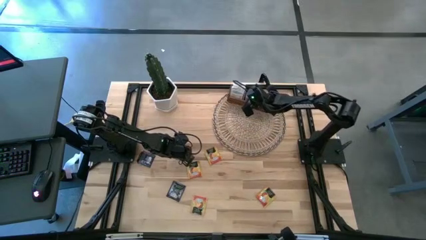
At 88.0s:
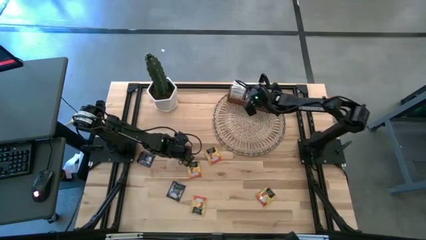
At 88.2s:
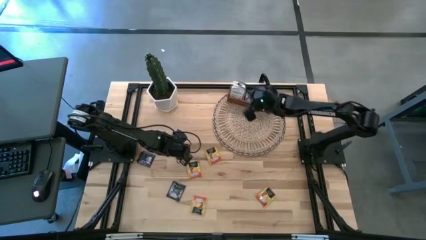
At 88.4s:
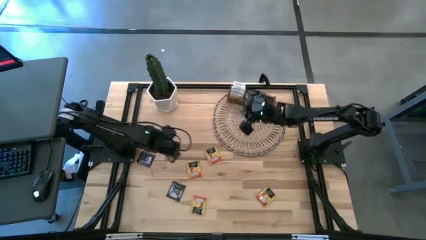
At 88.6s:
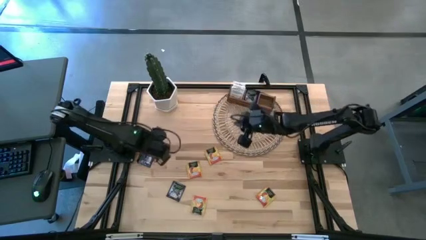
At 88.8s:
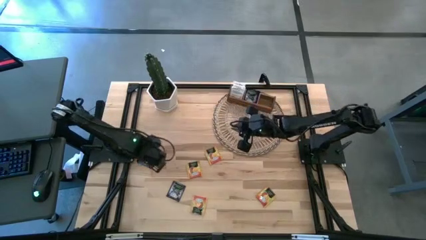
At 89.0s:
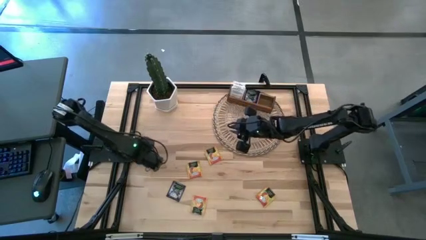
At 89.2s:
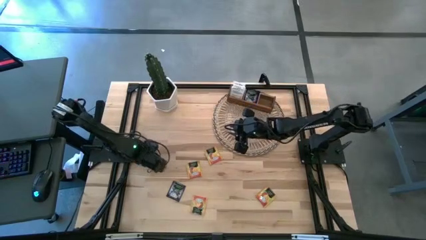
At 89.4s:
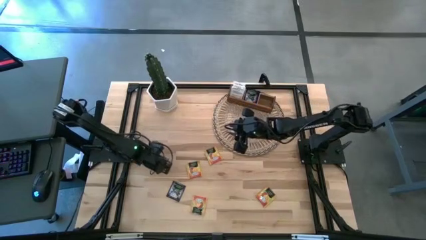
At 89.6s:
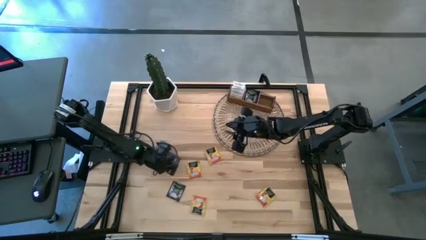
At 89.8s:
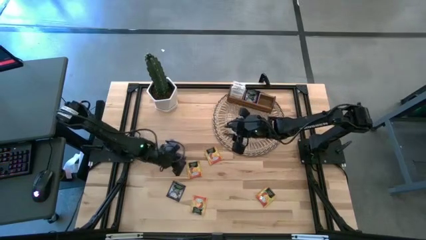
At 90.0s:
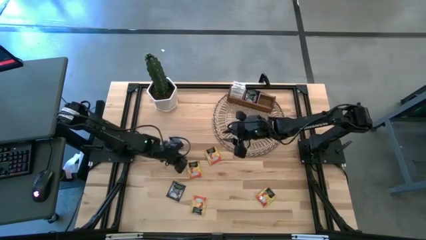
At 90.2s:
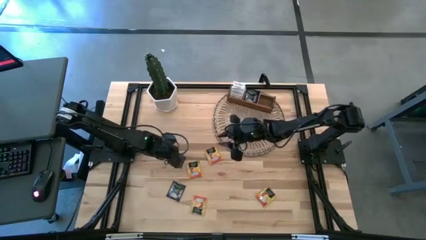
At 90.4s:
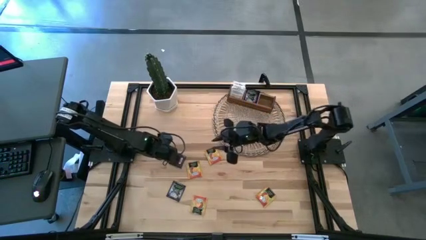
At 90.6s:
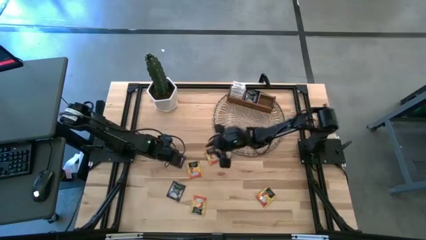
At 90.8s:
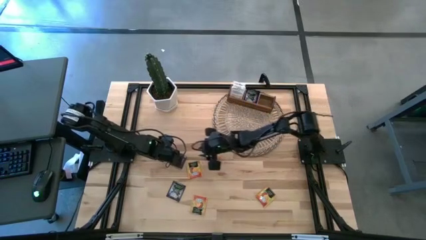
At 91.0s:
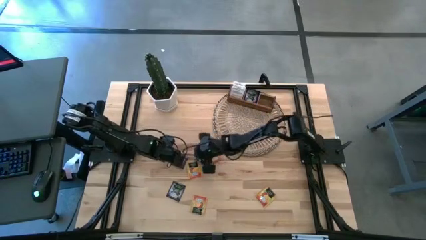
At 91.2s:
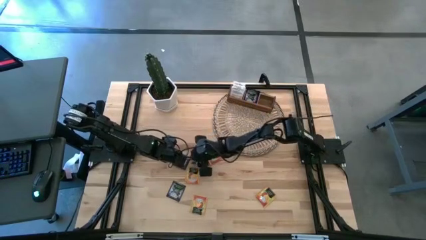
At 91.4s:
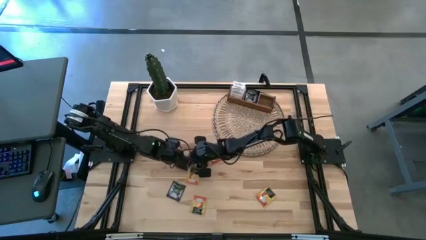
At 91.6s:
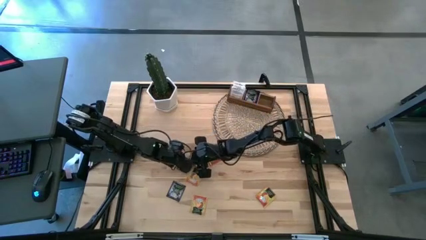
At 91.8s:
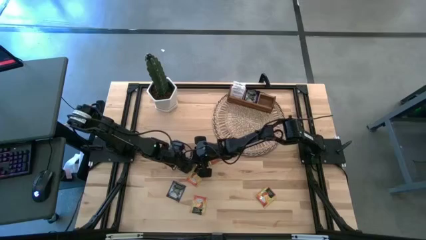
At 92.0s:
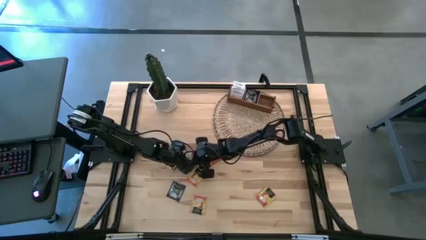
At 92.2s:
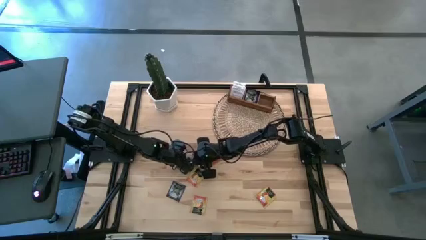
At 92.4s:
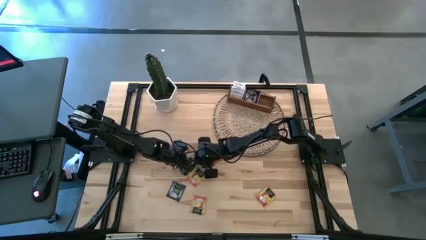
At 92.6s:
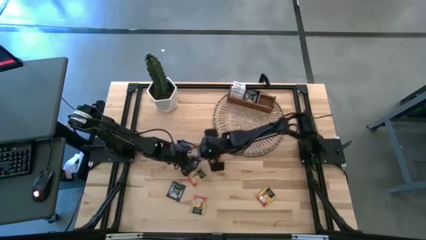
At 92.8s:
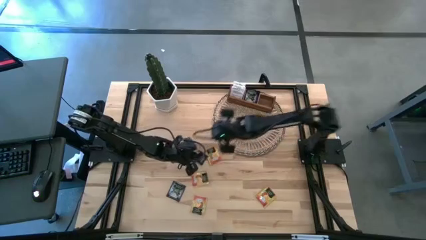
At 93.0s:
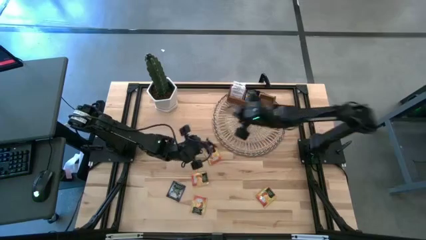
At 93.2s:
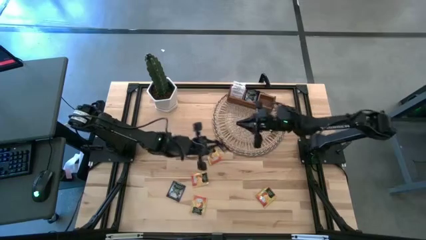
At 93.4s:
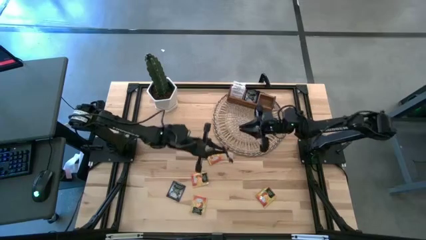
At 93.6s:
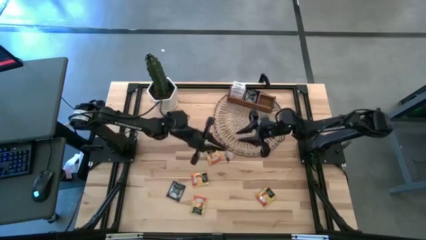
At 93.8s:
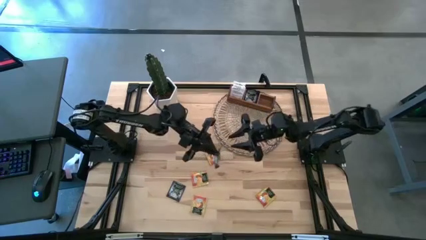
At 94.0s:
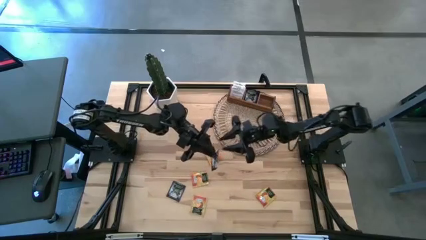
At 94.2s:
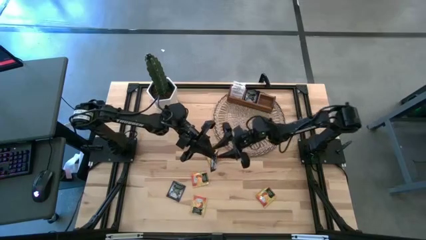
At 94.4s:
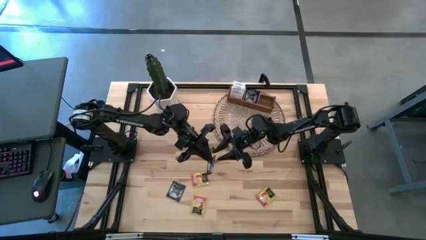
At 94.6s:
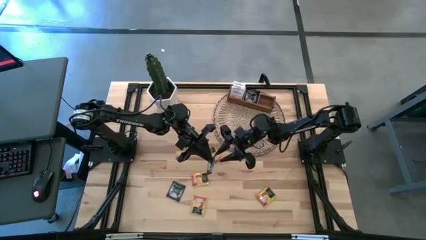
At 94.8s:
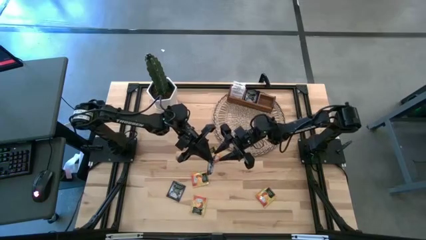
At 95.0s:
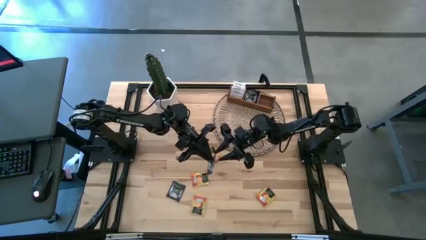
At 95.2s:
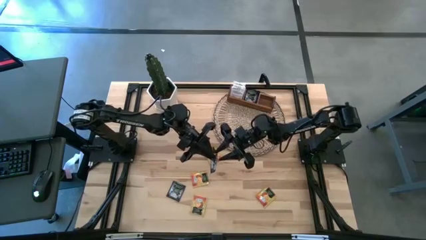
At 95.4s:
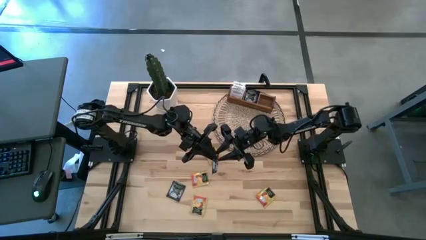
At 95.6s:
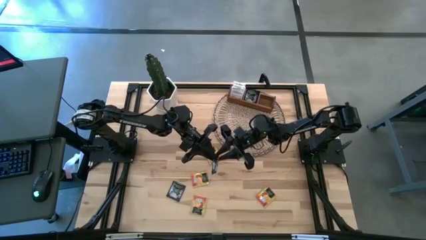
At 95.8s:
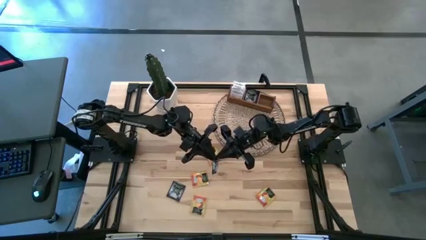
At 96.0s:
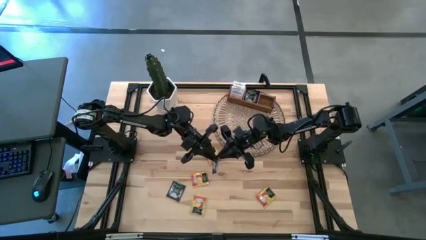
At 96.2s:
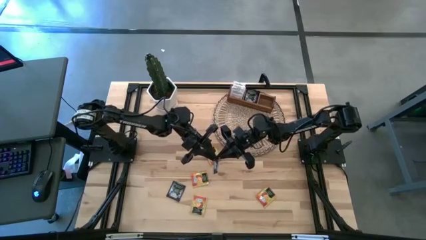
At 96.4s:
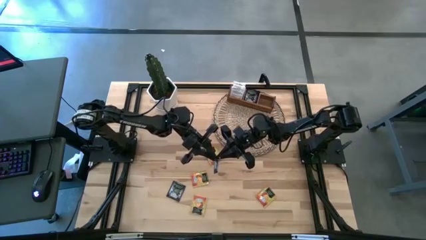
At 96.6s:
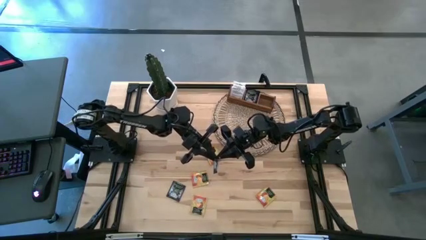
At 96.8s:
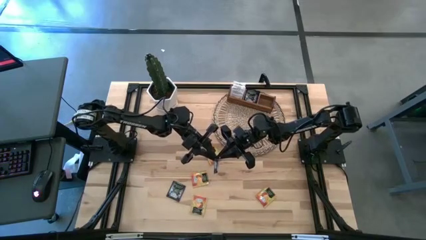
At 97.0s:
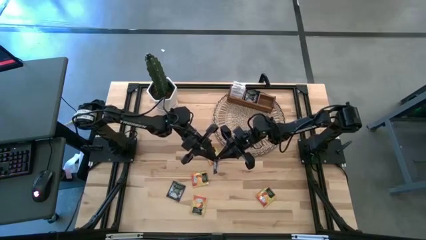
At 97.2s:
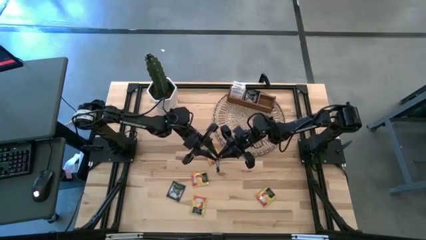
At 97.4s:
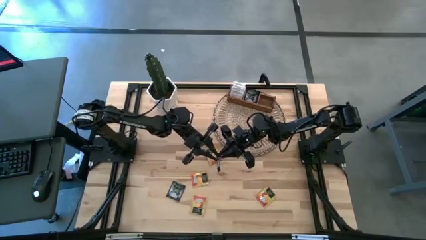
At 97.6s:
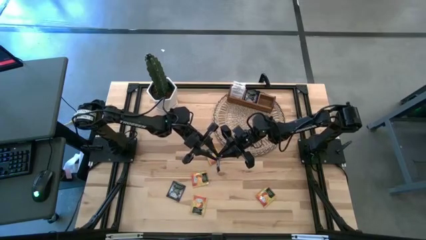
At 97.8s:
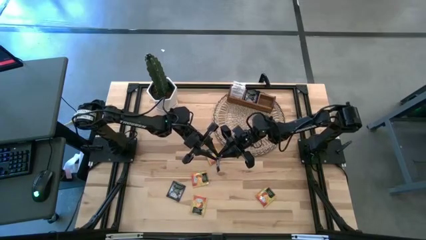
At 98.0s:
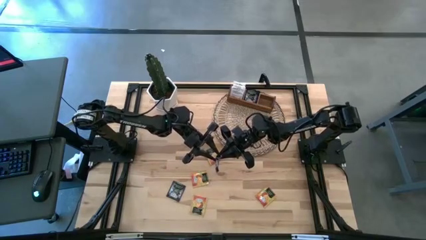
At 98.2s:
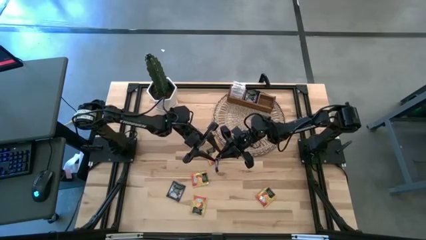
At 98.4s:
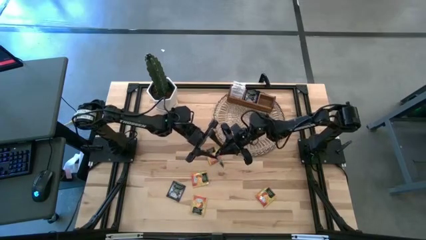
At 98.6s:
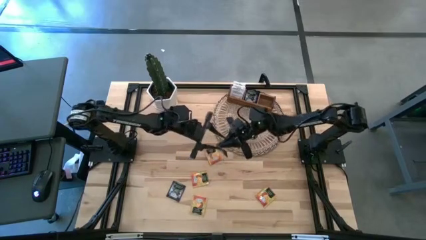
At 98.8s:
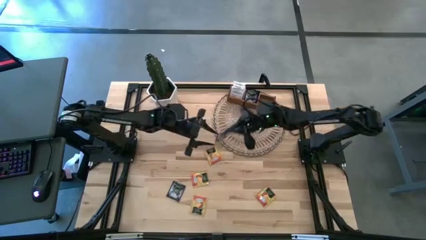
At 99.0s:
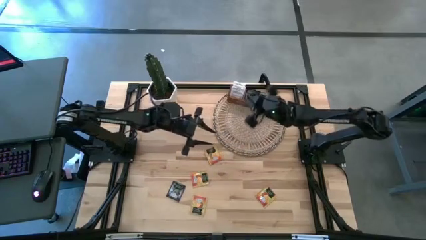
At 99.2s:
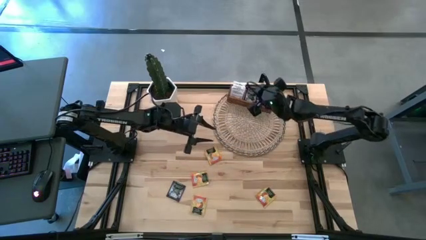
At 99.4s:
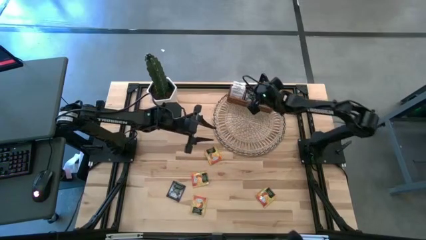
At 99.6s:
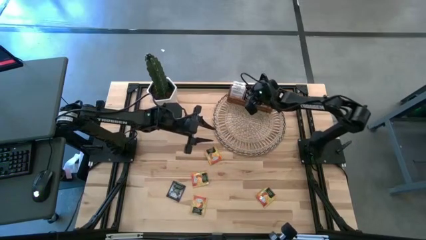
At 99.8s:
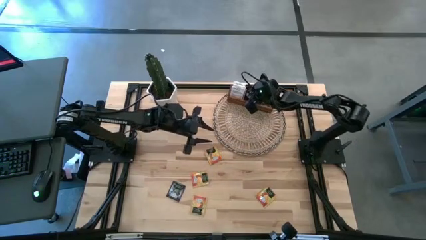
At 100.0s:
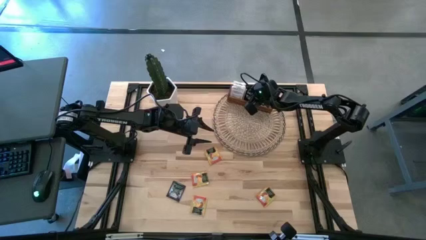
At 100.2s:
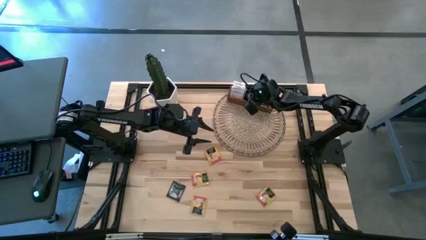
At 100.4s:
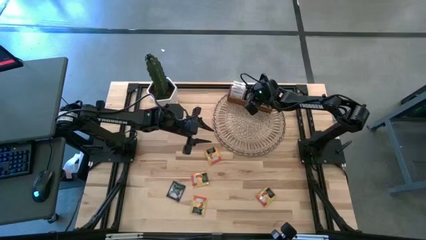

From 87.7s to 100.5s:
Task: Pick & Place Tea
Put the blue tea bag into the middle section of the wooden organizer

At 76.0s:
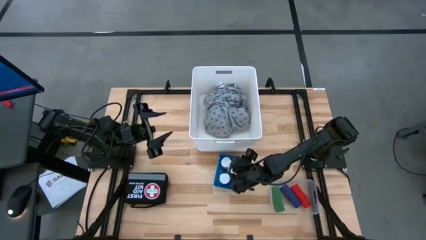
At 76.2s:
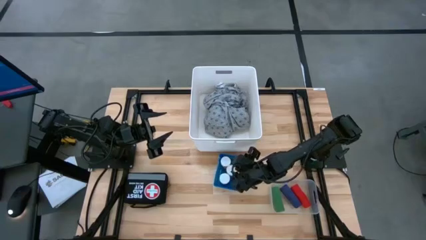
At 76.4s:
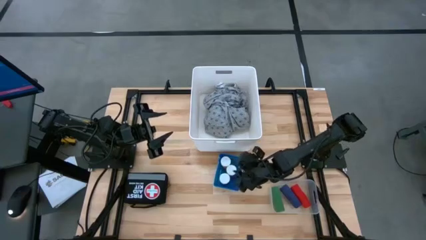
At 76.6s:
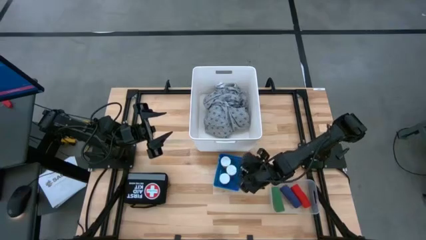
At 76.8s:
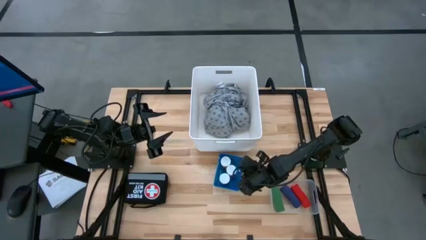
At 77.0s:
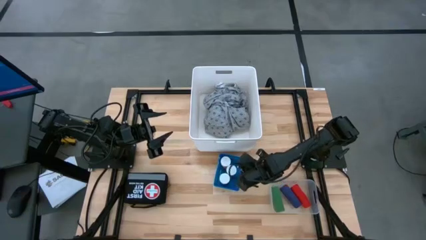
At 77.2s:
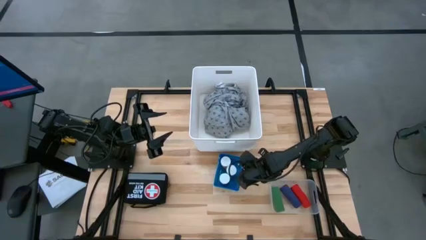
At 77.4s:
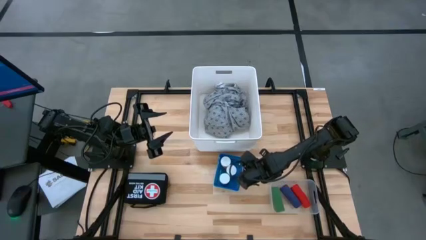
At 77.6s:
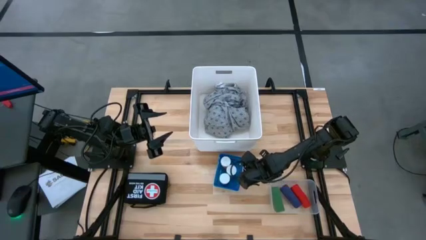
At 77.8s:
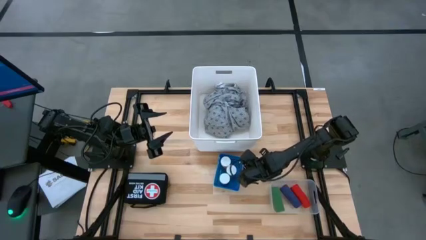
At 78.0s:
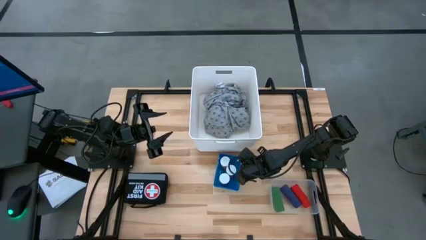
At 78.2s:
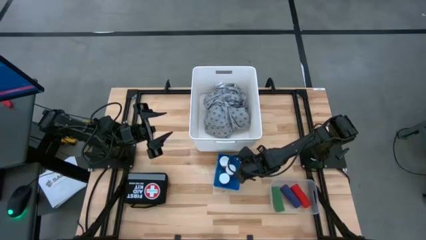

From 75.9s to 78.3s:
Task: Pick & place medical supplies in basket/bin
Adjust the blue bin

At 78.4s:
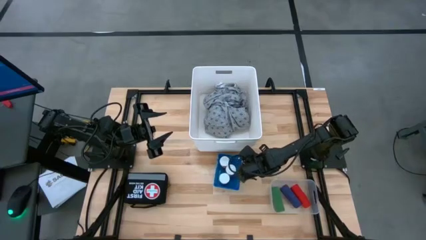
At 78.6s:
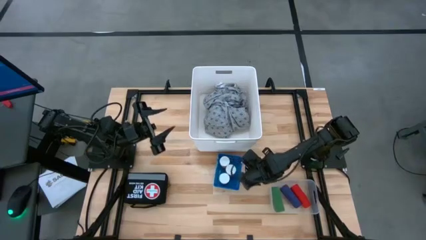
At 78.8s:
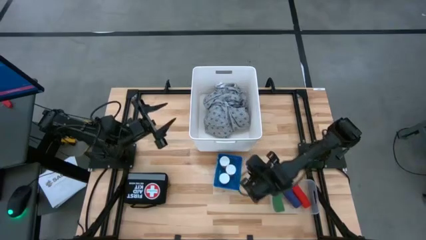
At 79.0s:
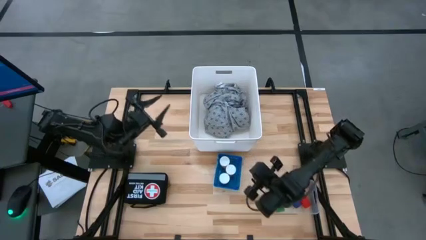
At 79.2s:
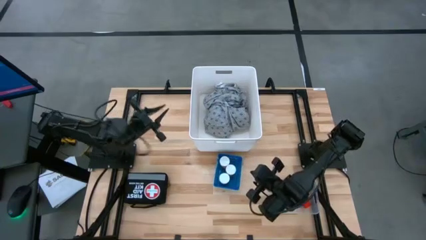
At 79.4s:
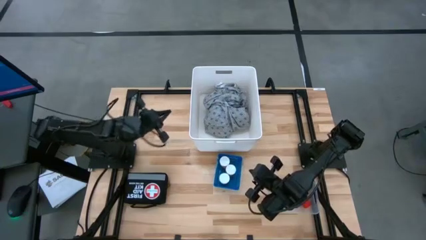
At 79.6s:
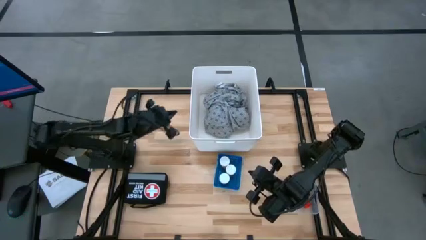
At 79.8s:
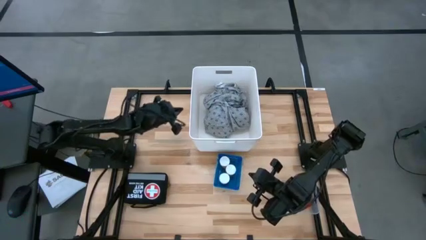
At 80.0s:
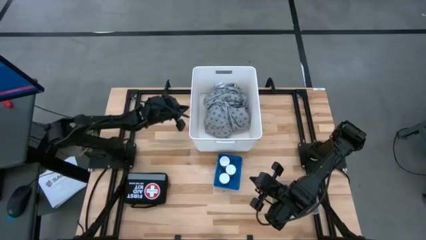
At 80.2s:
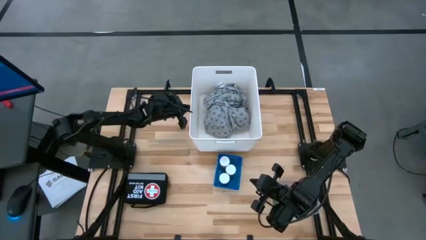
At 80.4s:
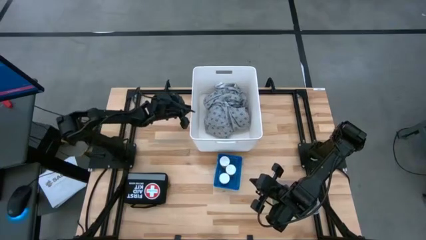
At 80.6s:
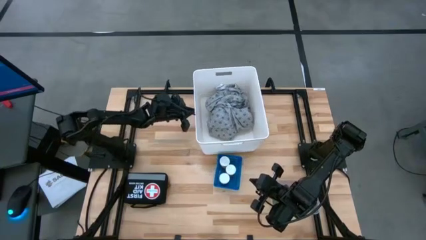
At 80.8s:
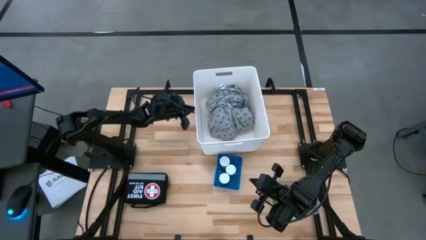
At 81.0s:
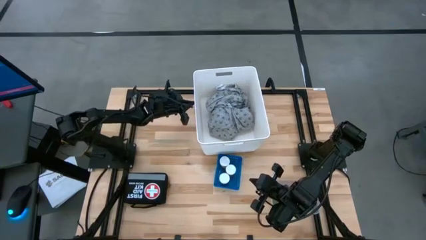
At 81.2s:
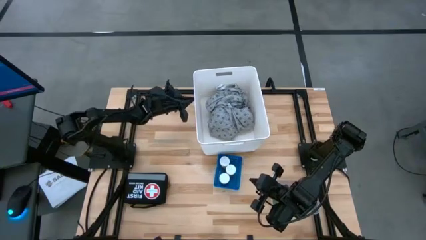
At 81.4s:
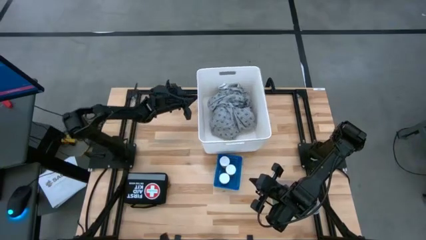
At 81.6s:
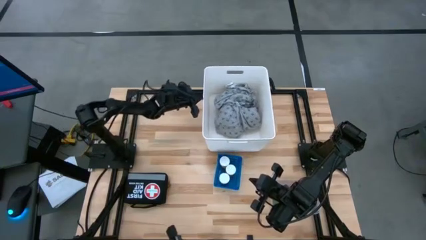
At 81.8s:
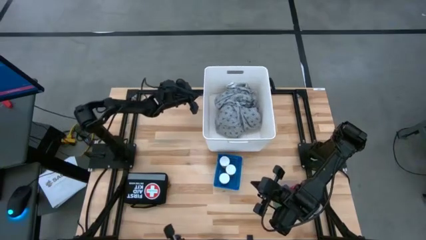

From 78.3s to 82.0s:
Adjust the white bin
